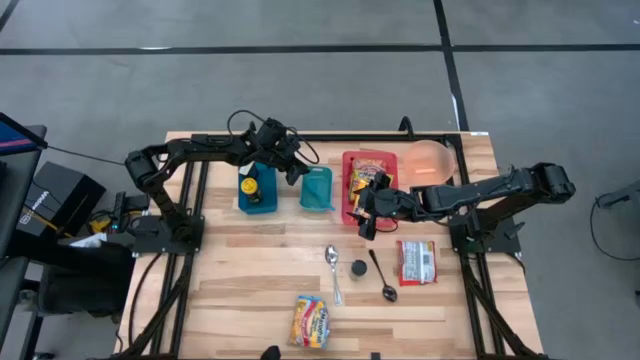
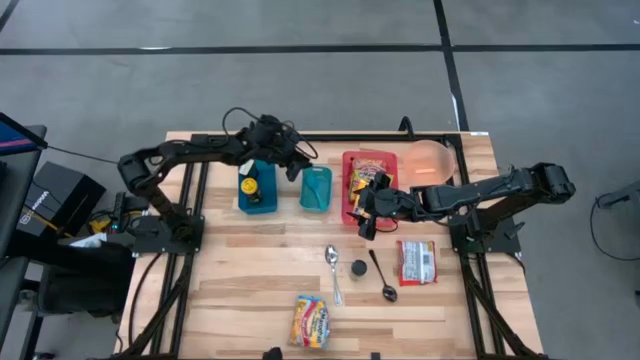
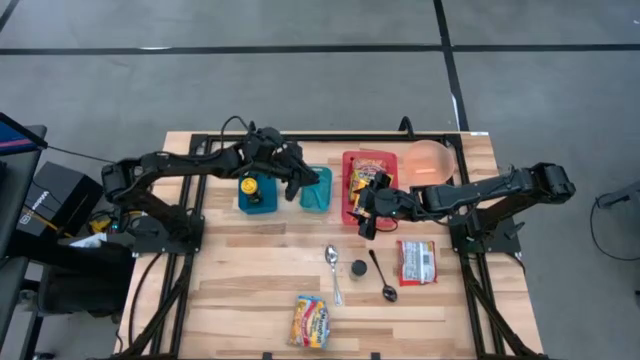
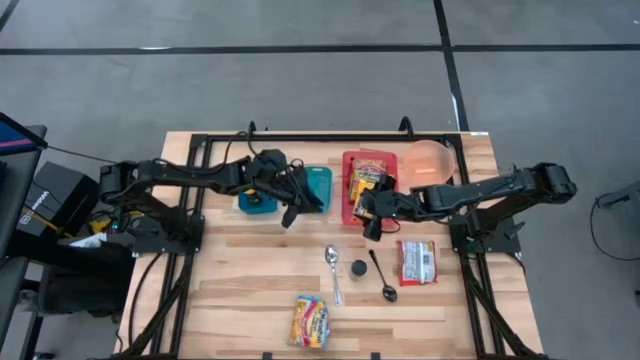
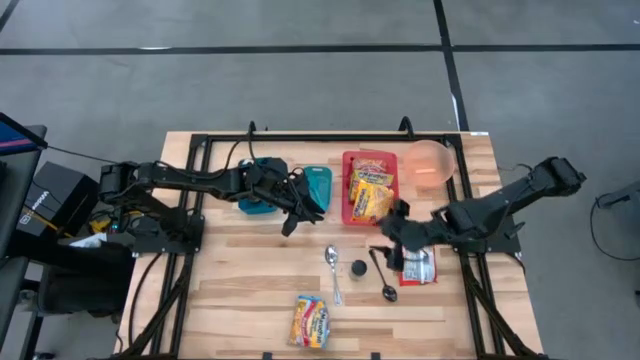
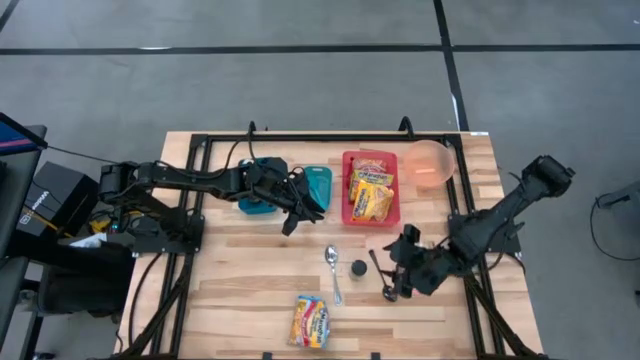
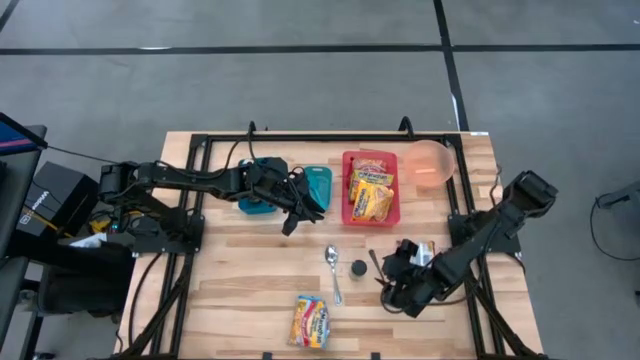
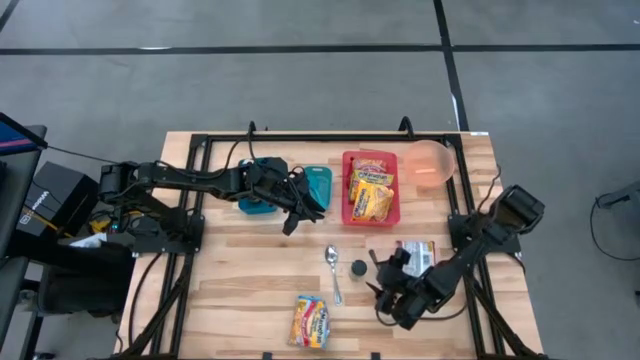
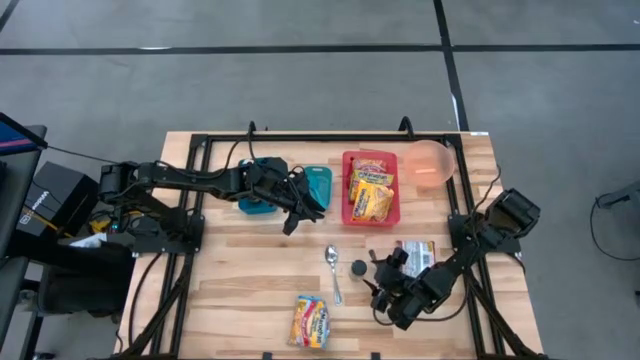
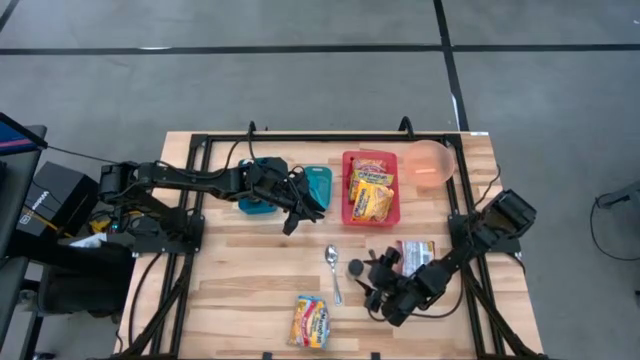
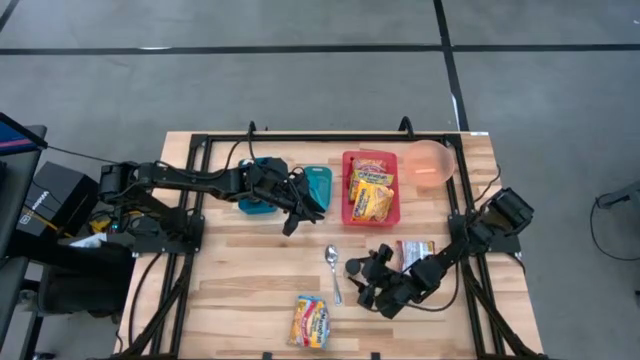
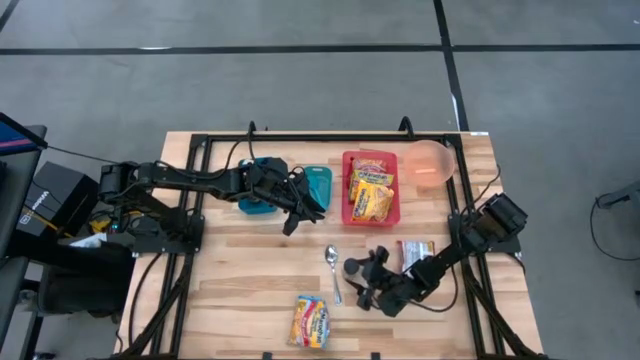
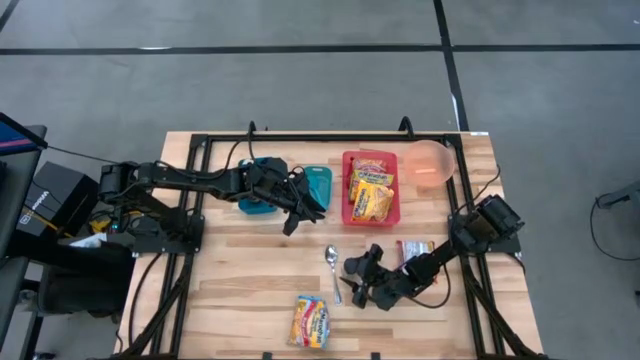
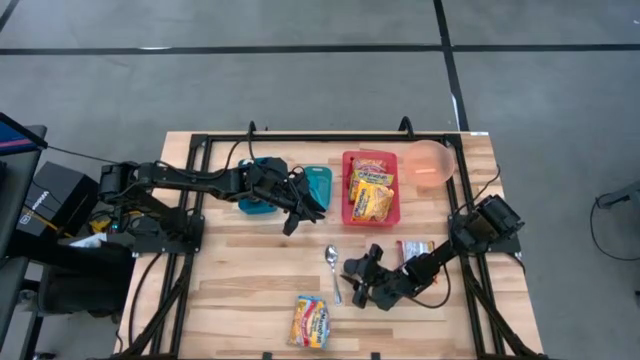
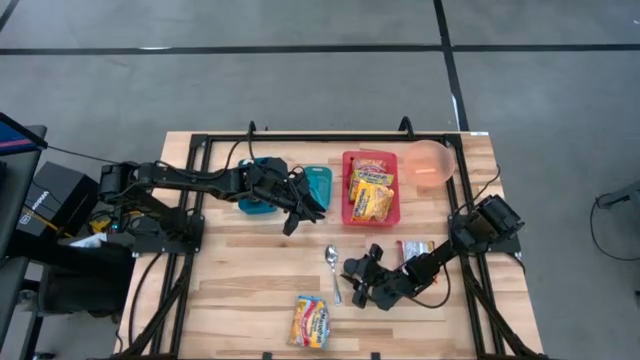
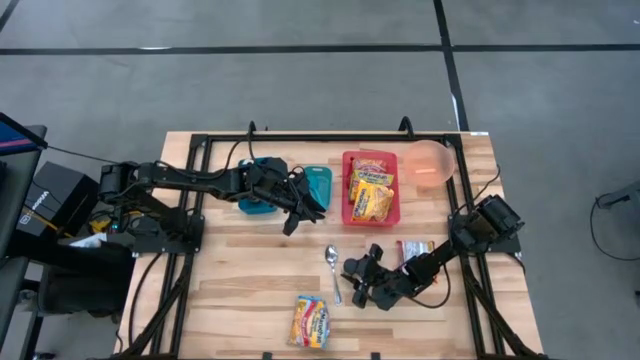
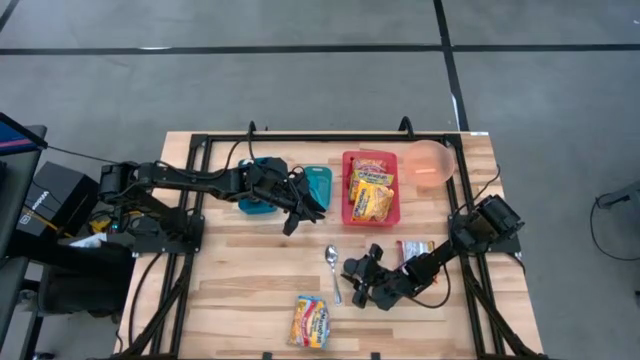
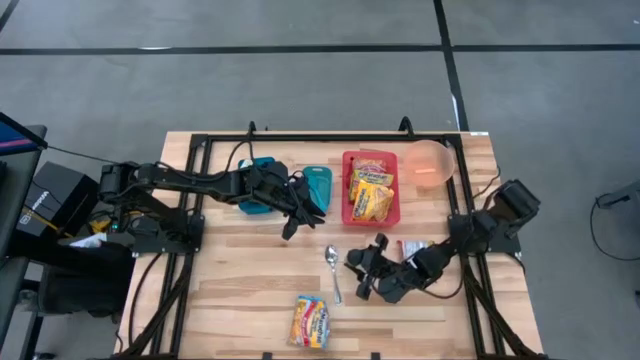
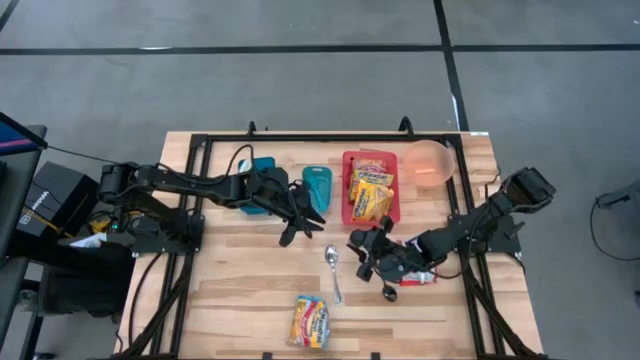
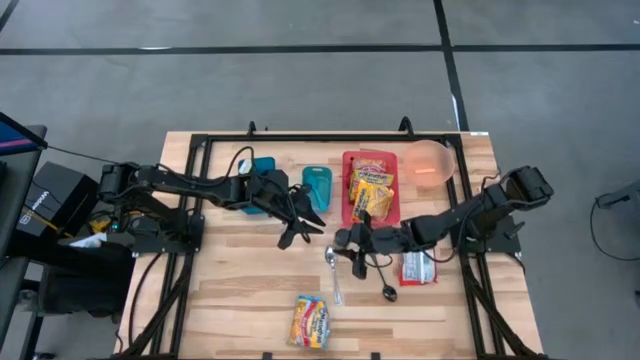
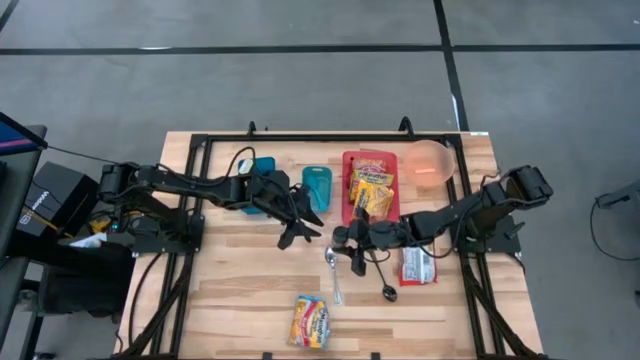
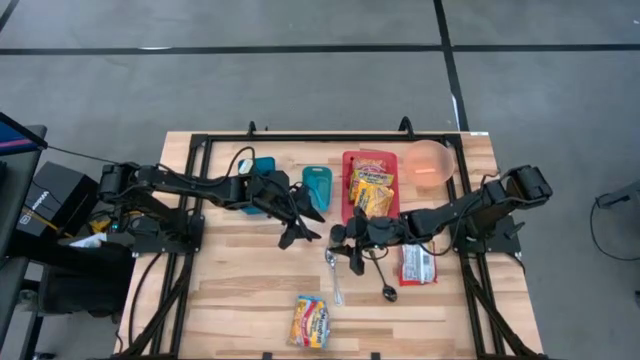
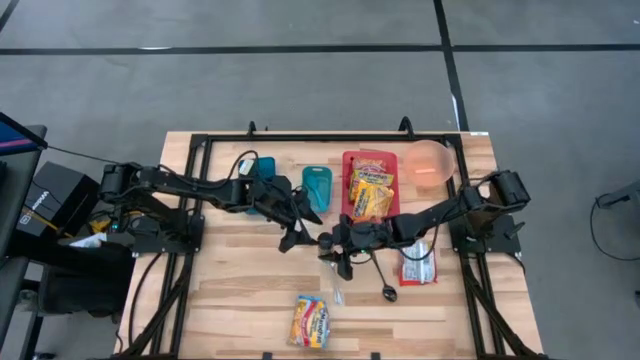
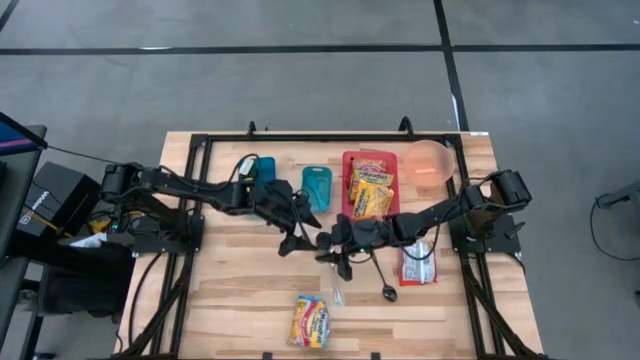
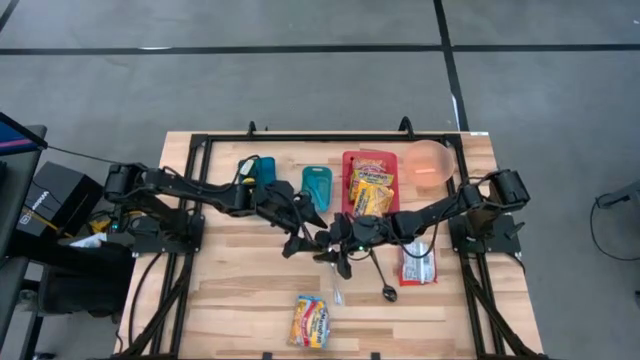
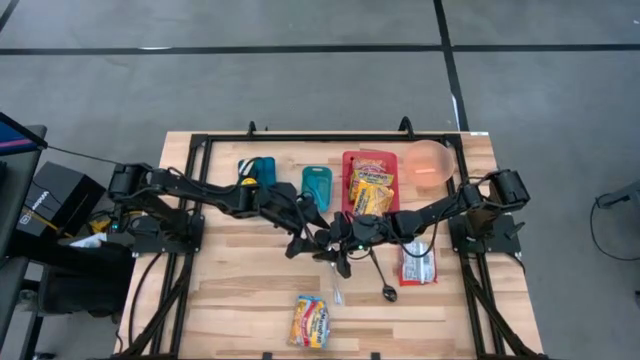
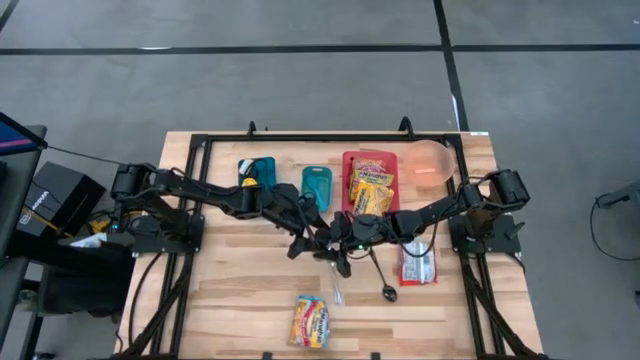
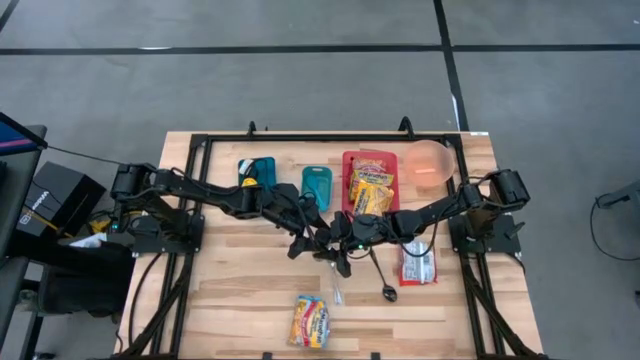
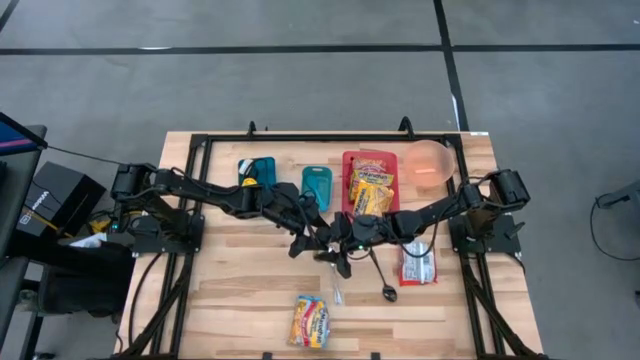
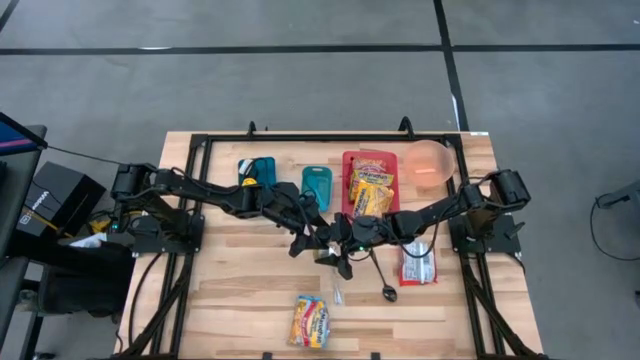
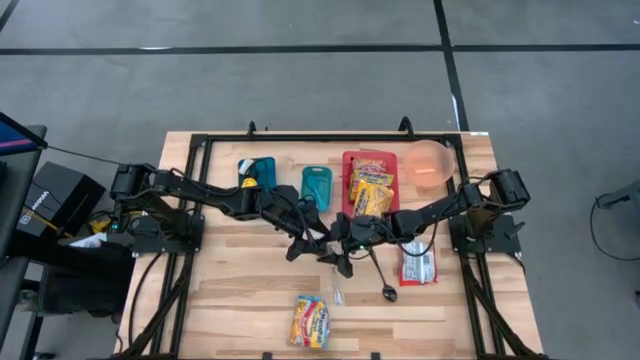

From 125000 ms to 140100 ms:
Task: Pick & Place Food Item
Put the black spice bottle into the blue bin

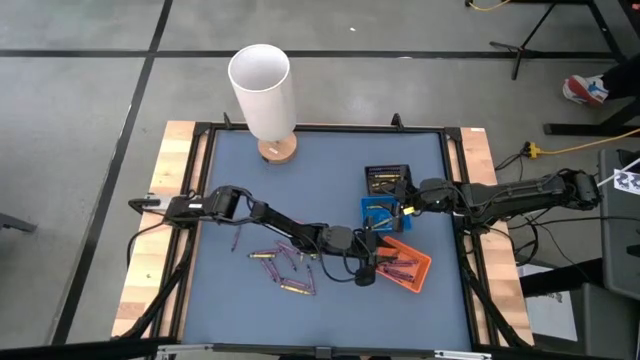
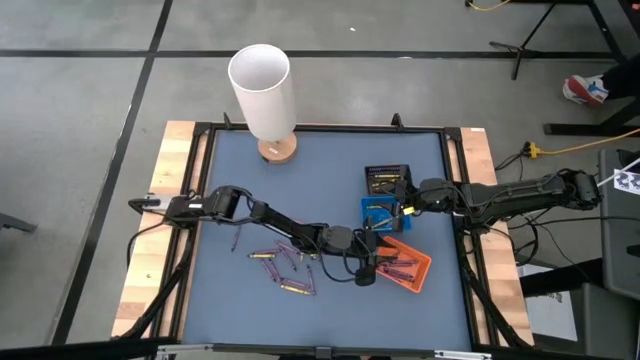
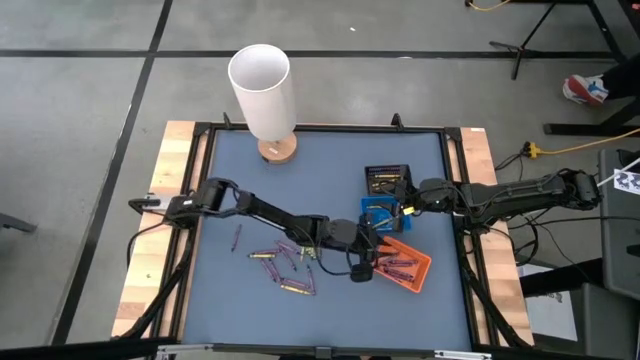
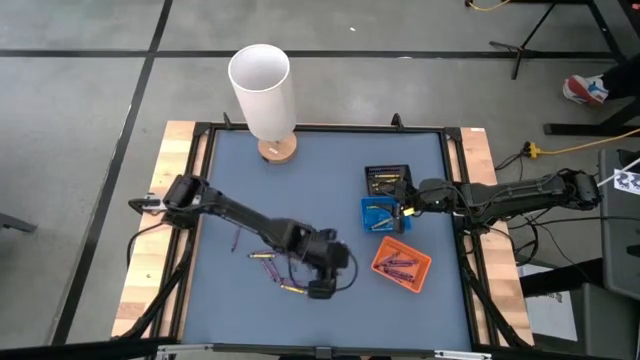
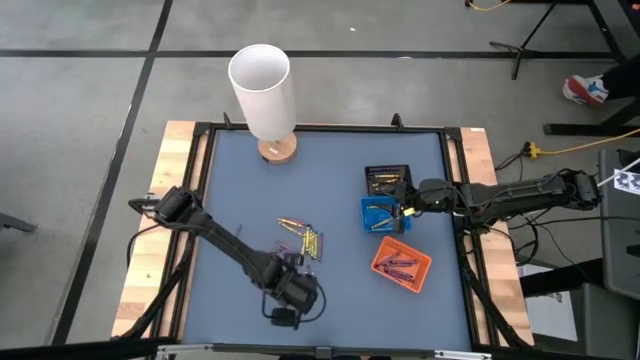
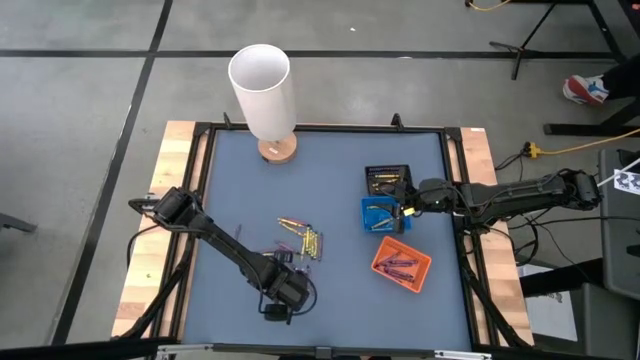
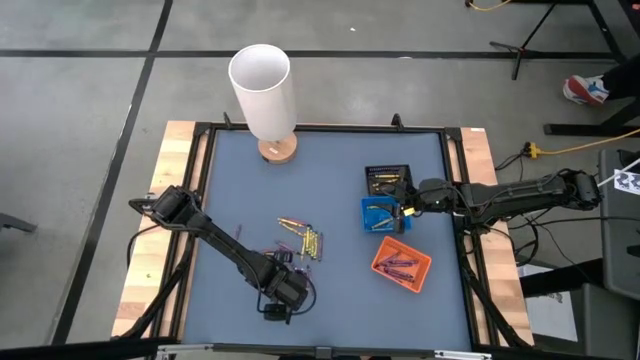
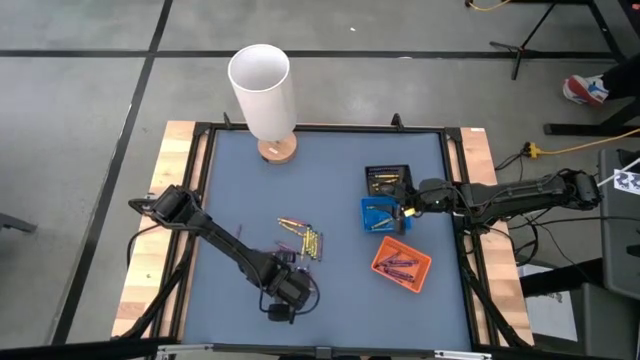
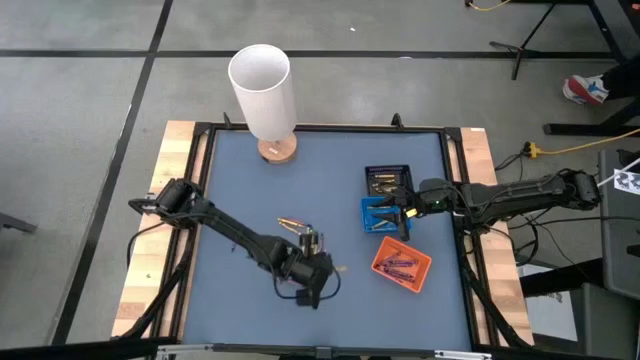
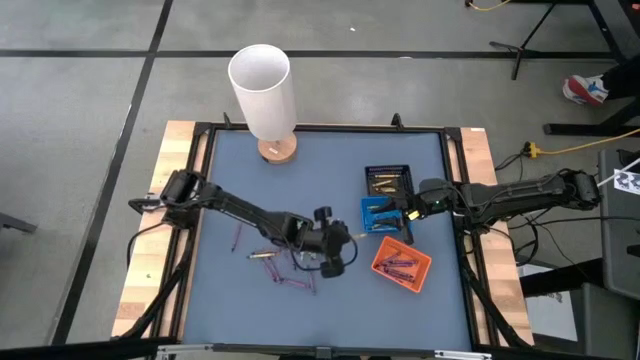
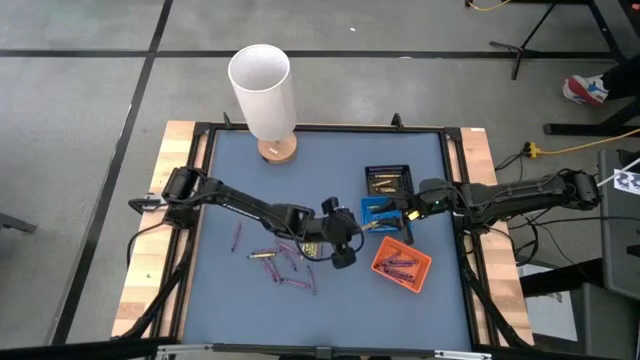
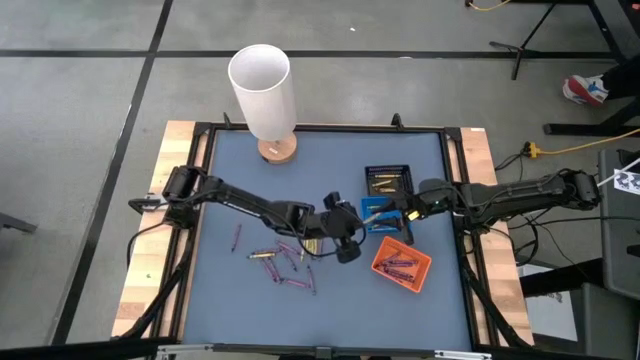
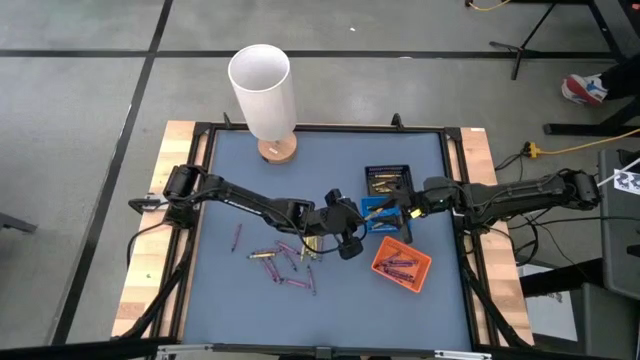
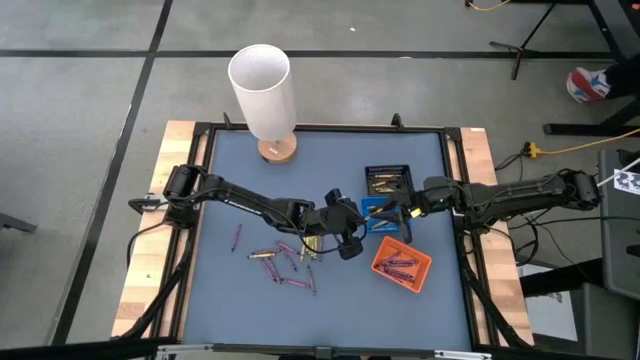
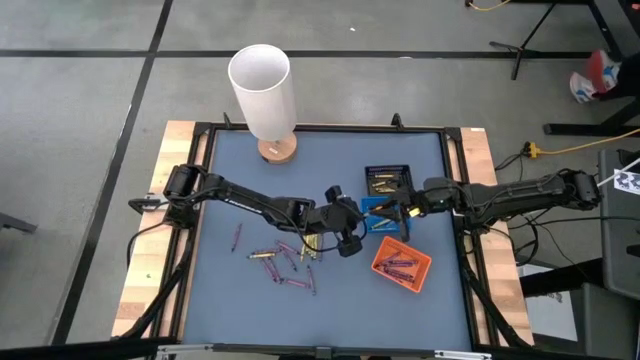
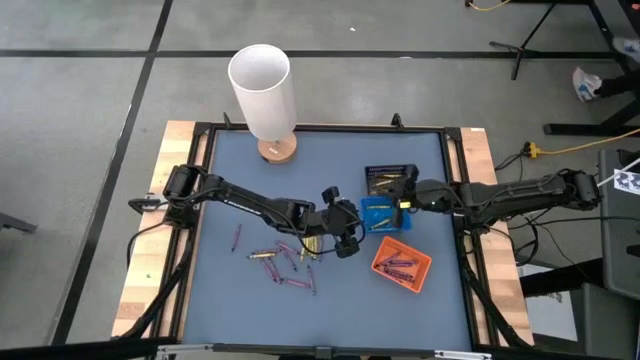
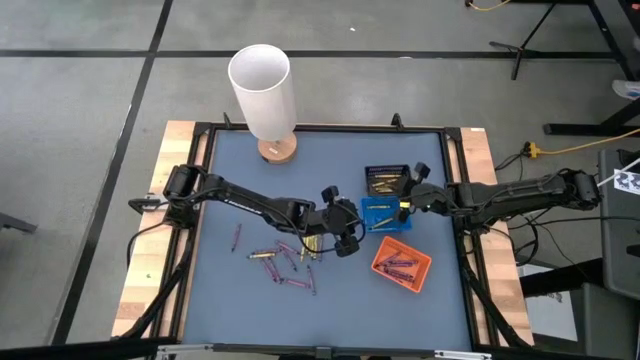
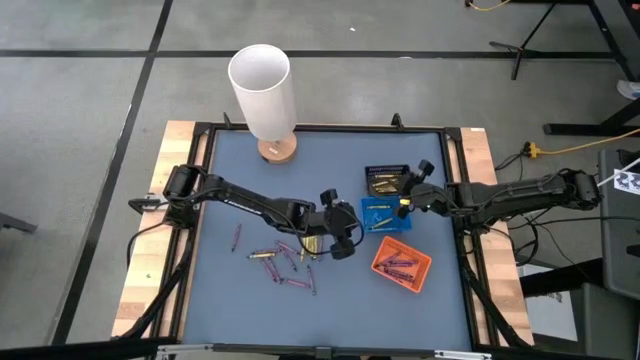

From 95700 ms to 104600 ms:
Task: Sort crayons
Put the yellow crayon into the black bin
